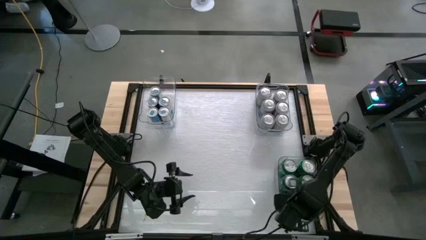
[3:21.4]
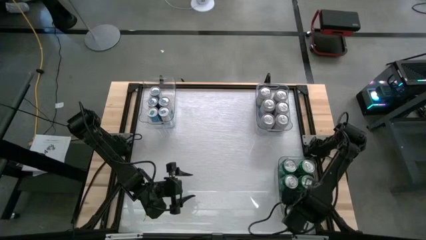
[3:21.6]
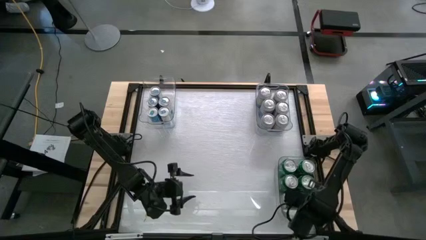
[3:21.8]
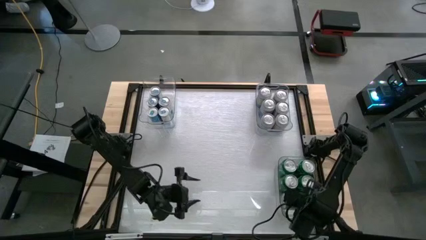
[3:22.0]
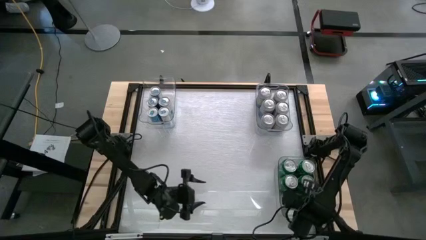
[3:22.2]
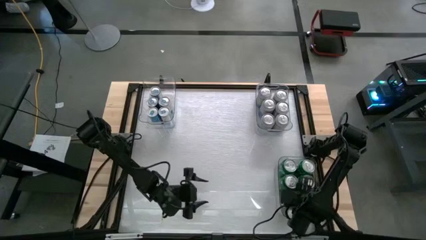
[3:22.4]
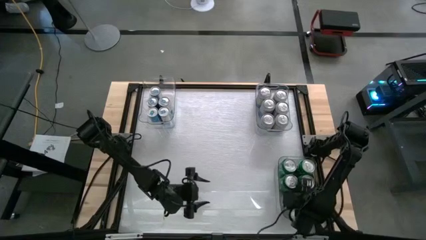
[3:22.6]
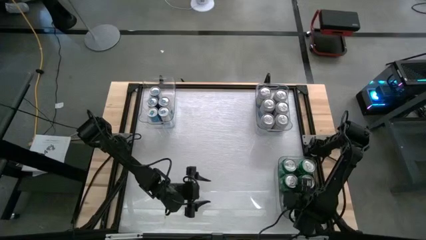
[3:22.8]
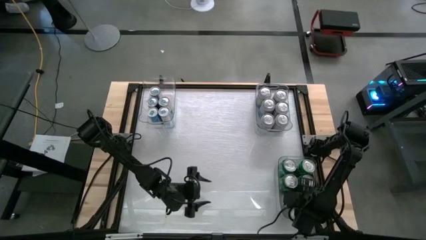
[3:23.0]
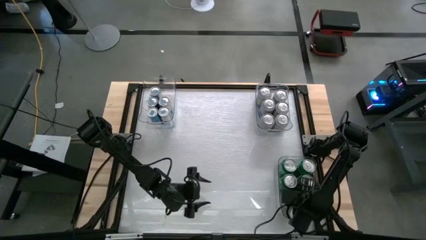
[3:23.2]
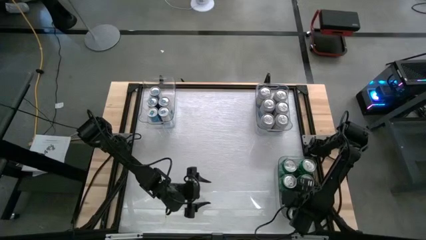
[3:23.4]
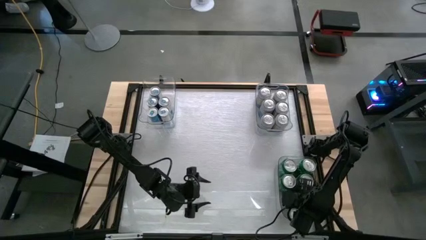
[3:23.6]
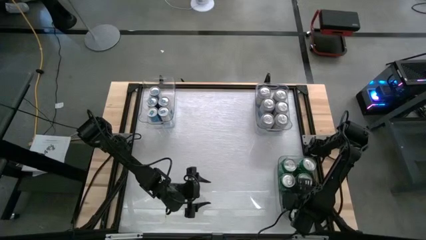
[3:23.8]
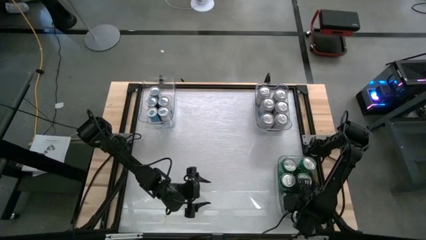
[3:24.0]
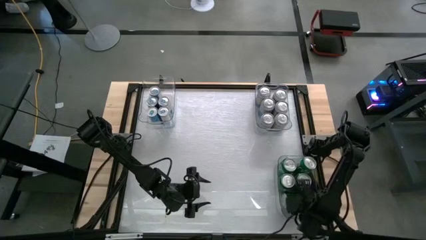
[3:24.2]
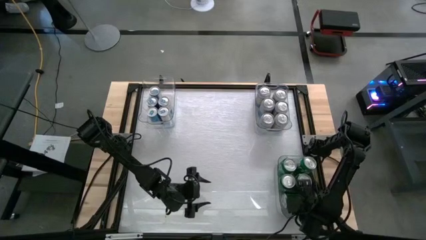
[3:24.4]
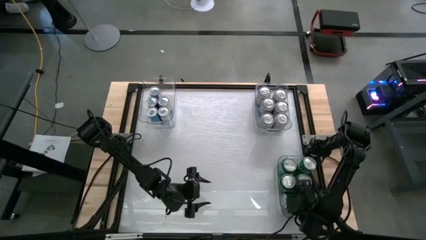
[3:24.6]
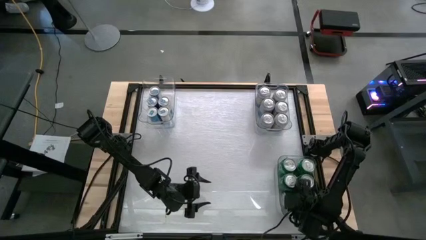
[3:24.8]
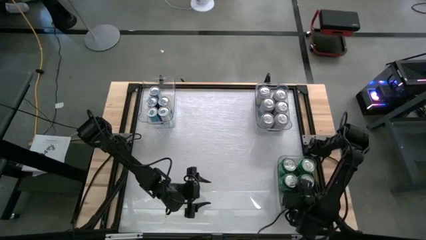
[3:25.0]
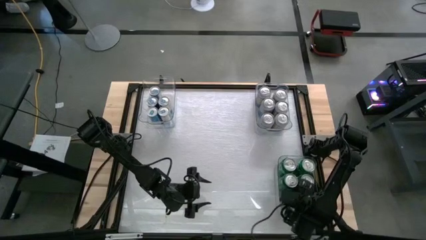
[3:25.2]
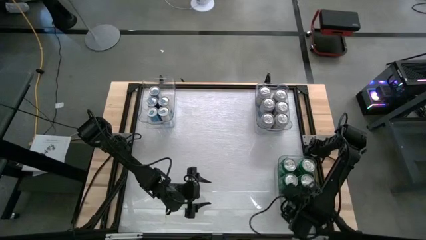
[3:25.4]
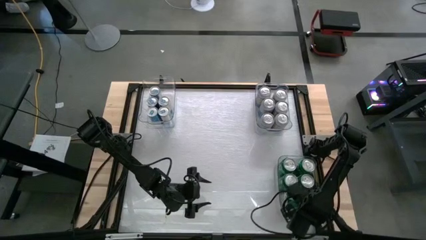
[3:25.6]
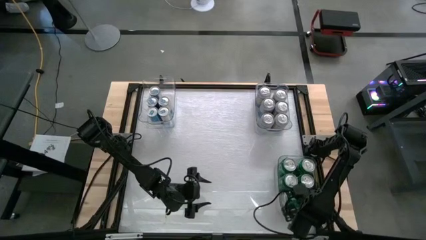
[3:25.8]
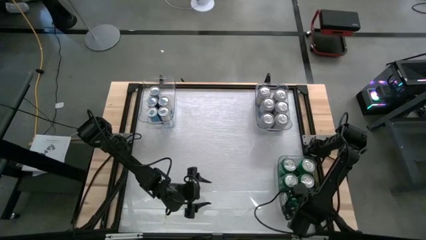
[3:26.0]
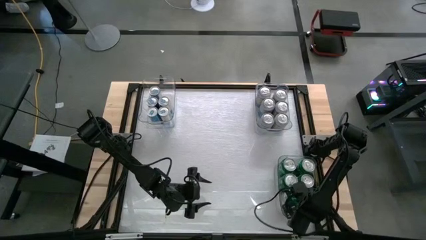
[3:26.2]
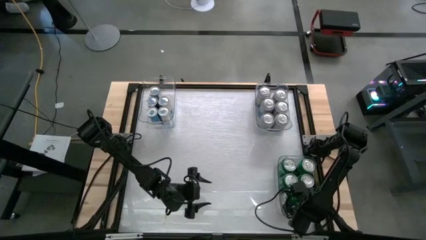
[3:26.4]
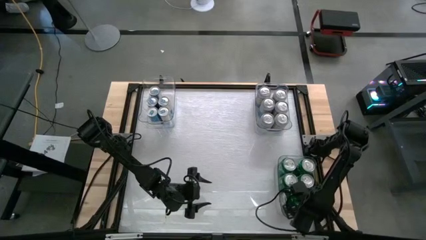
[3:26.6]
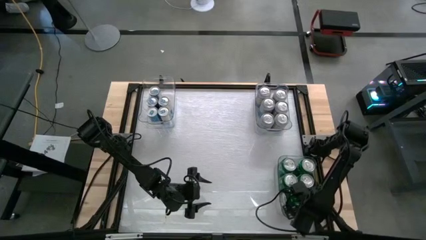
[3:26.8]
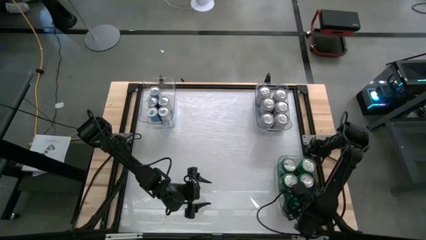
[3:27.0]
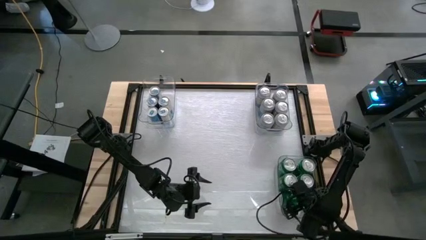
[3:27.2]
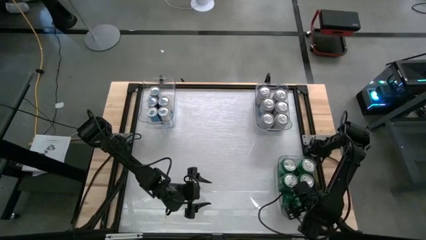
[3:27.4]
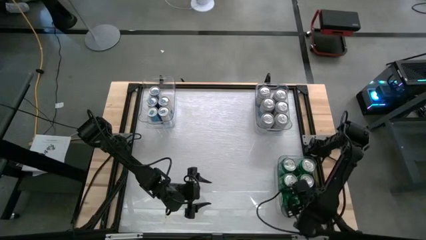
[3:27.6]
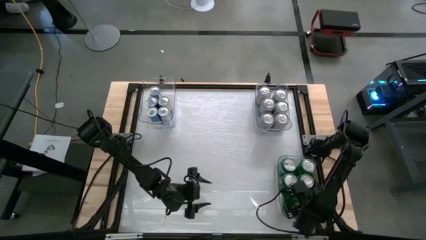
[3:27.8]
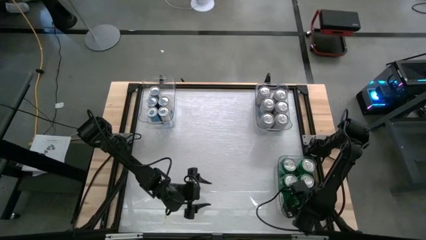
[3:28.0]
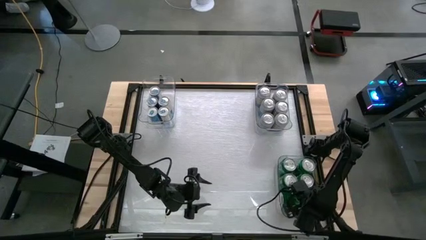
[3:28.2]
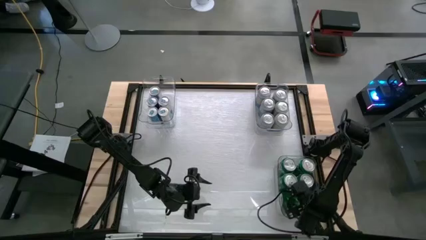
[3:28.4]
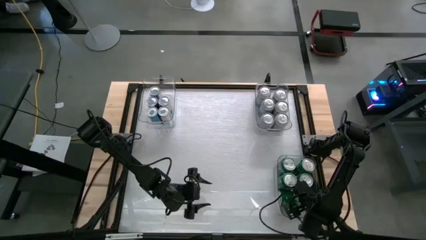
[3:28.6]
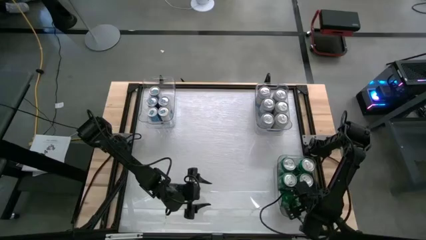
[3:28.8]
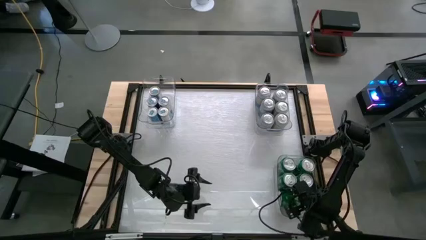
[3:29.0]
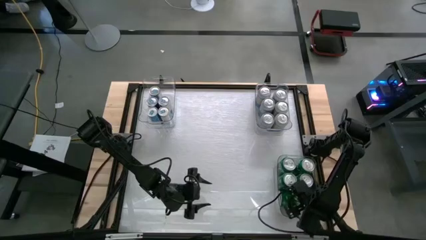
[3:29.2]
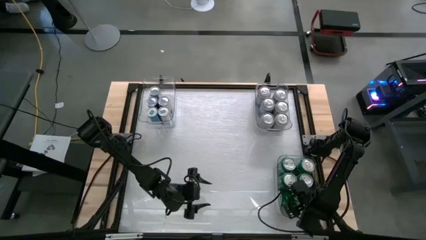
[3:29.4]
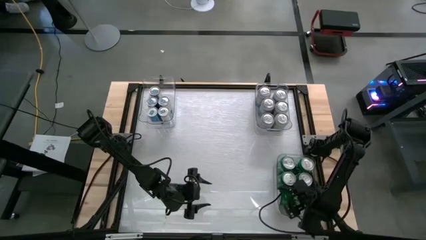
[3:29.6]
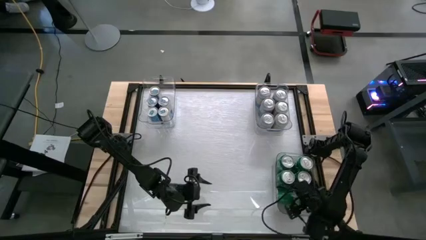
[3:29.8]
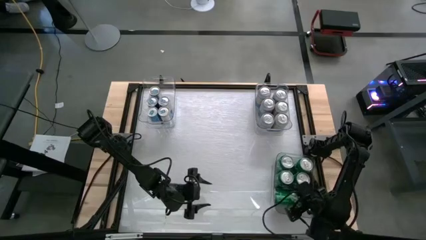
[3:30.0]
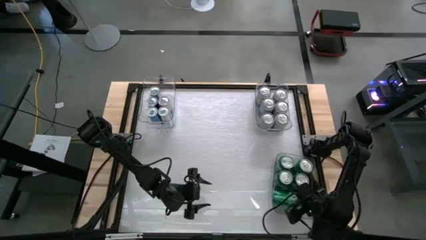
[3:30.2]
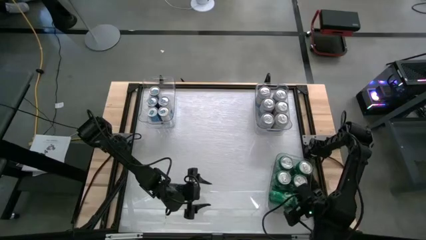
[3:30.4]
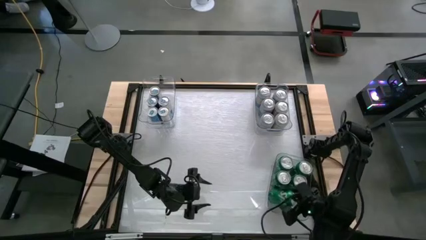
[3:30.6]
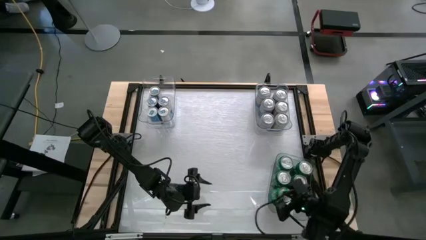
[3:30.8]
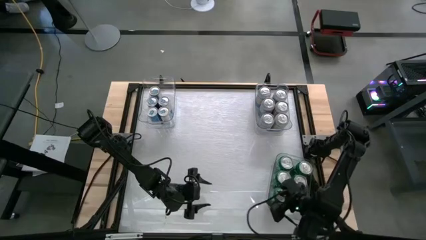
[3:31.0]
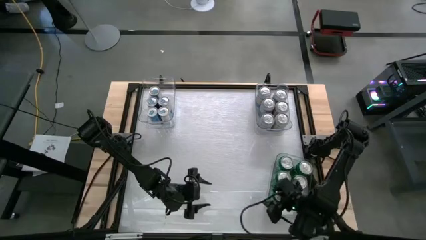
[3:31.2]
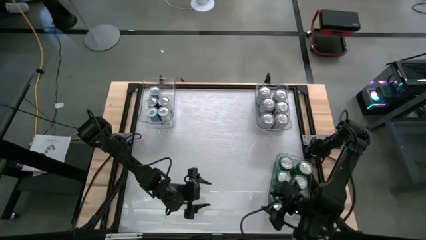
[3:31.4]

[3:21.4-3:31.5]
Task: Sort soda cans
Put the green soda can into the bottom transparent bin

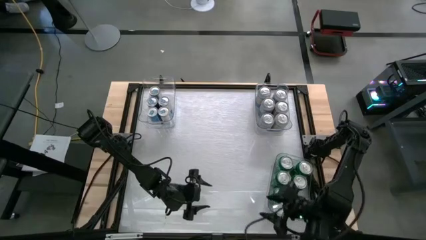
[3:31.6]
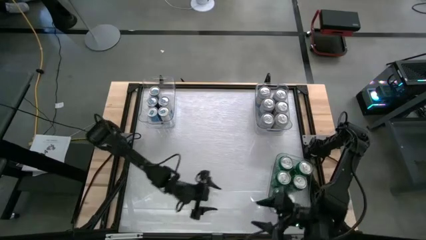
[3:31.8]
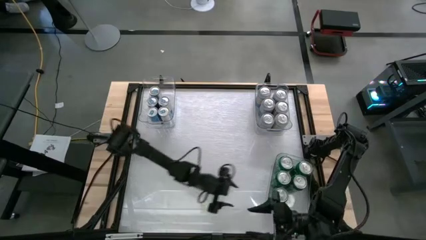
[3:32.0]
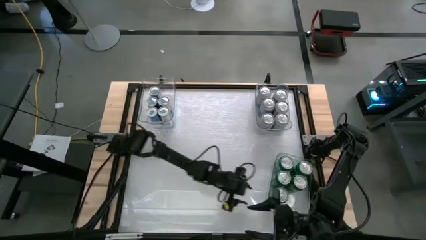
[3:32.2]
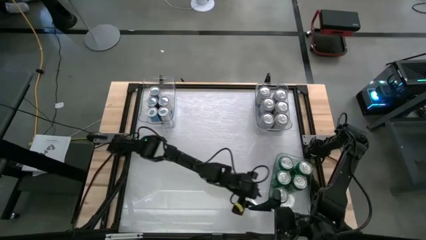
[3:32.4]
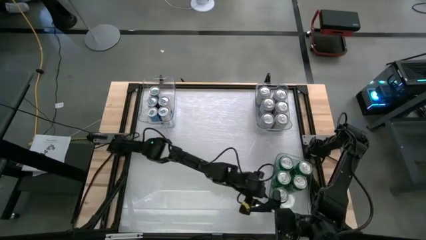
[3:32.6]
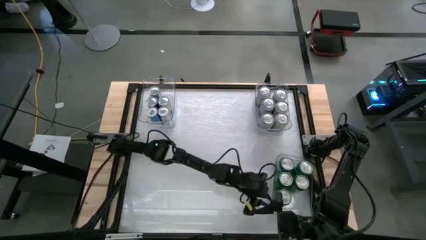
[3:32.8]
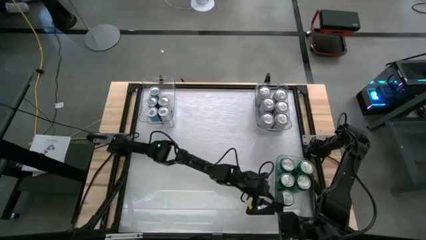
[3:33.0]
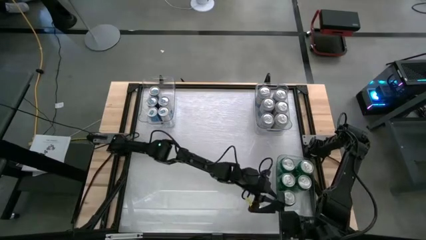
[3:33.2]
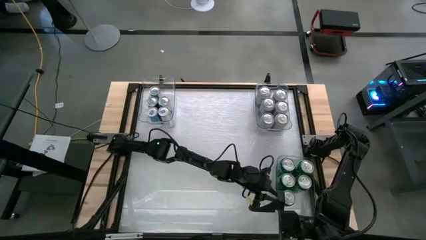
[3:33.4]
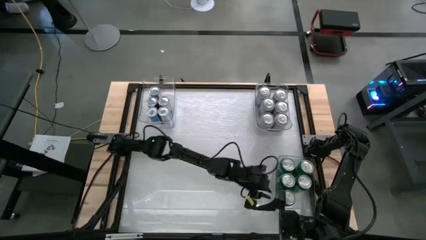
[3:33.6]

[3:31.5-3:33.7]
Adjust the bottom transparent bin

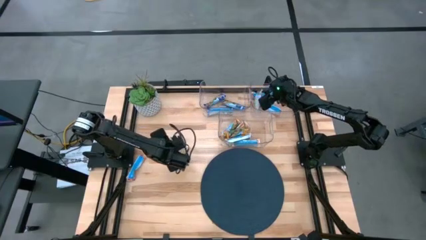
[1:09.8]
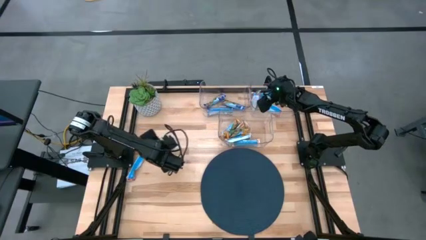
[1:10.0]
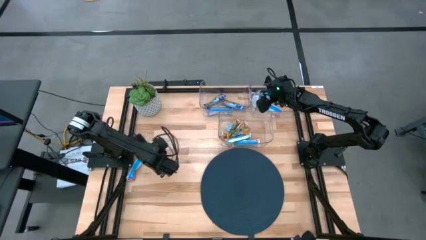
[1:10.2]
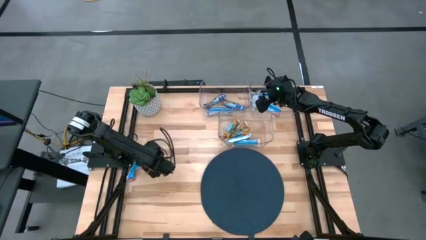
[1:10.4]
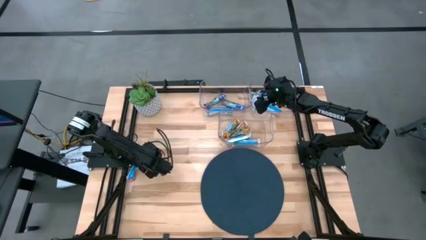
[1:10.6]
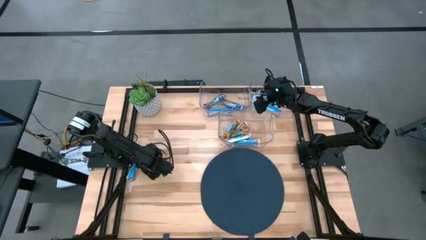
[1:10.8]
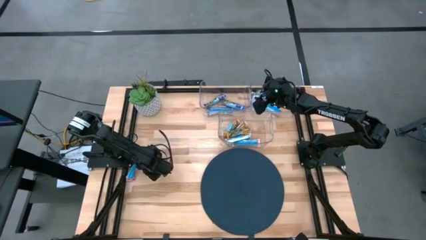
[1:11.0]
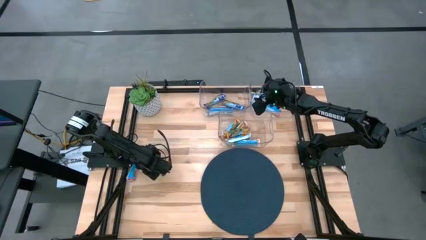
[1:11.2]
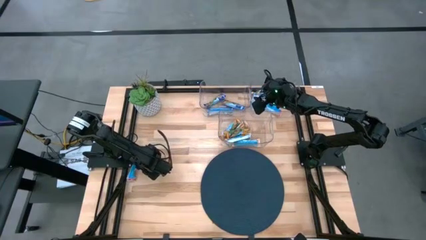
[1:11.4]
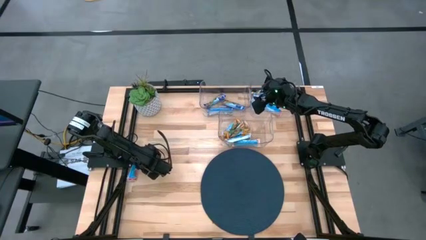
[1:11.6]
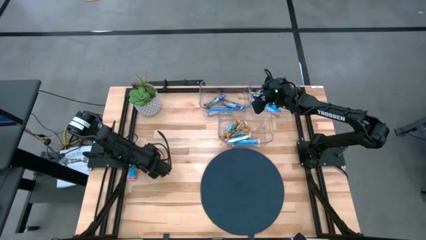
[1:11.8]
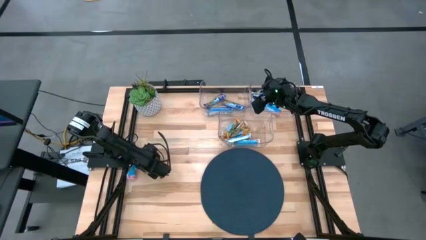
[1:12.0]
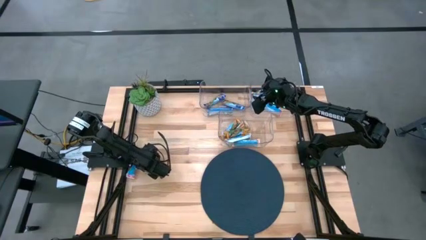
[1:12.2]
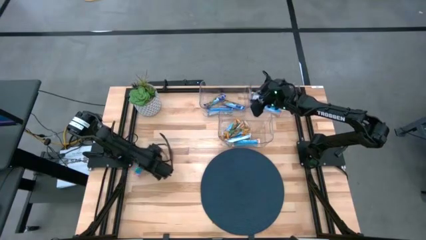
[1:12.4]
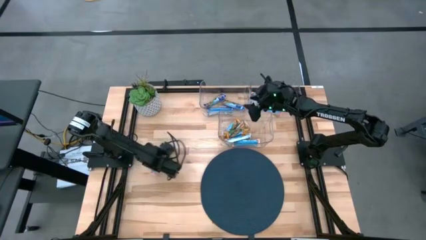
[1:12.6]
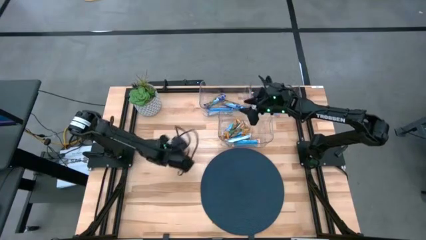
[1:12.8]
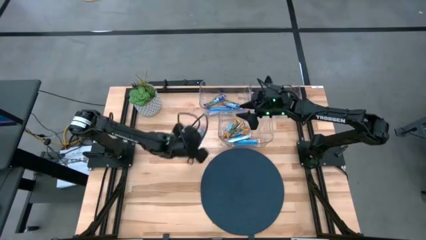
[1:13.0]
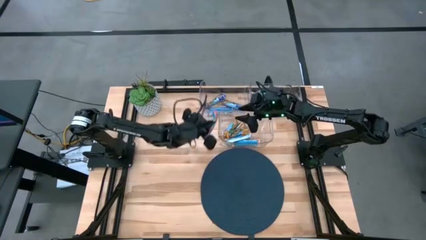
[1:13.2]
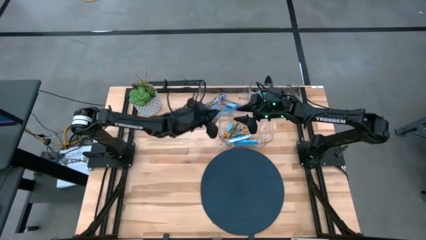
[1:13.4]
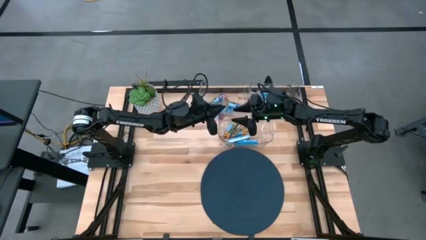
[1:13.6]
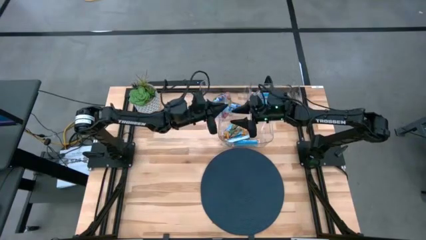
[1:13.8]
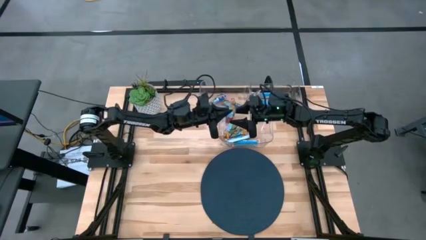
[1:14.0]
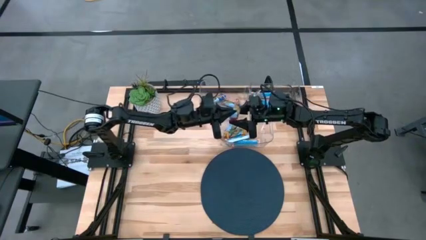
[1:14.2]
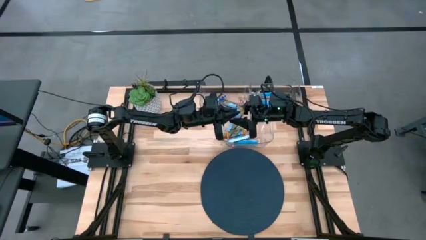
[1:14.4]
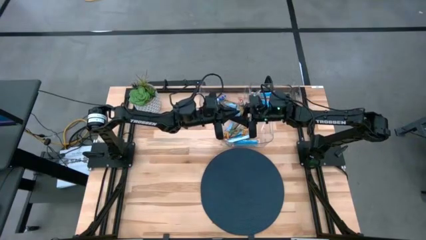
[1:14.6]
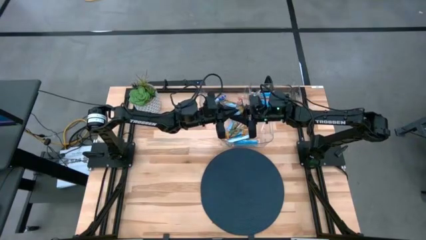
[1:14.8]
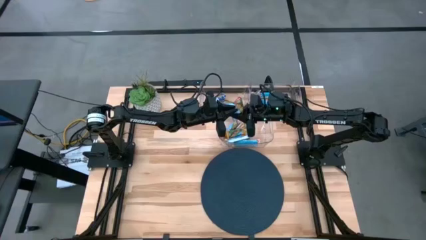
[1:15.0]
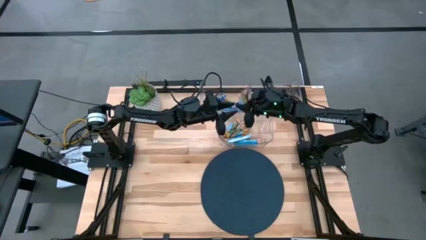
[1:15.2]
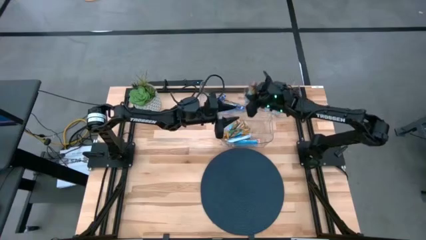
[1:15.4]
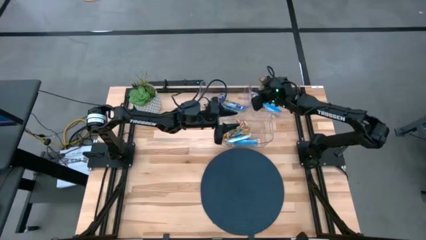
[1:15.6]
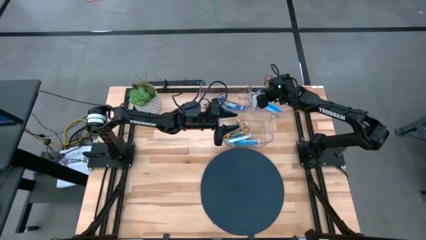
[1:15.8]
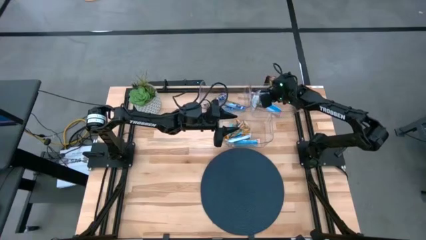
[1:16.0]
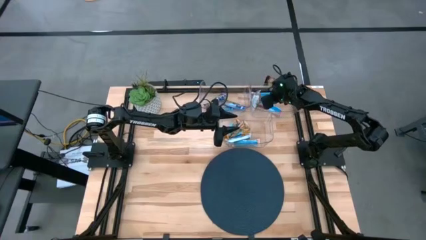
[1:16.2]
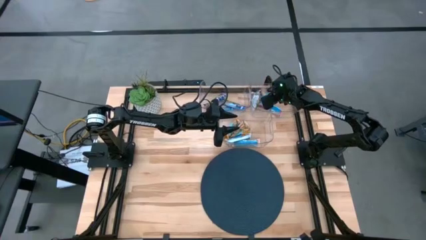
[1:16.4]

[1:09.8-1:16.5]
Task: Pick and place Granola Bars by type
Put the red granola bar into the top right transparent bin
